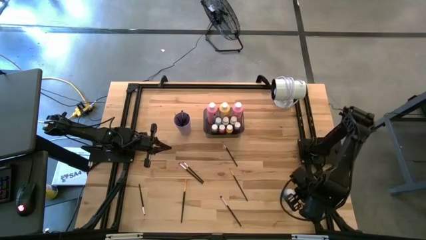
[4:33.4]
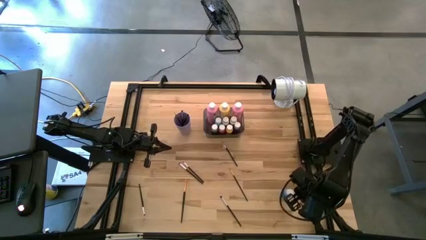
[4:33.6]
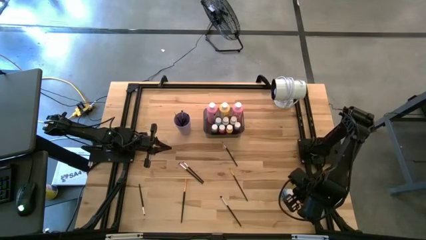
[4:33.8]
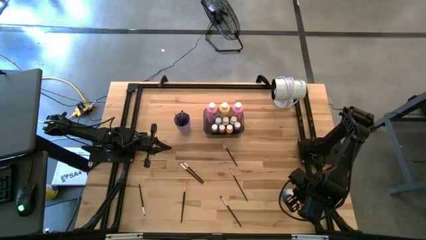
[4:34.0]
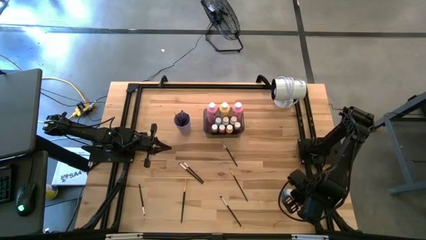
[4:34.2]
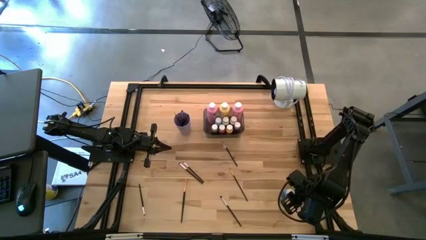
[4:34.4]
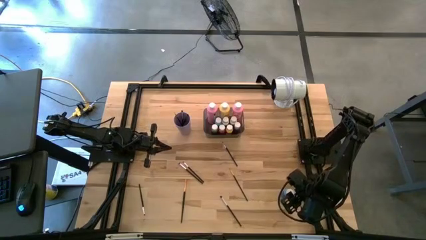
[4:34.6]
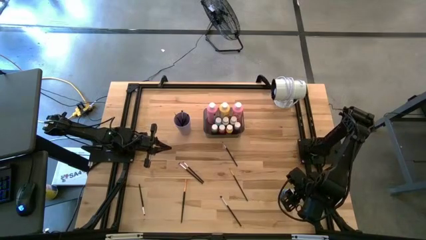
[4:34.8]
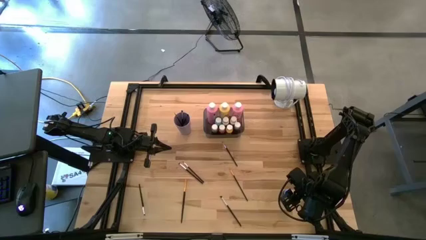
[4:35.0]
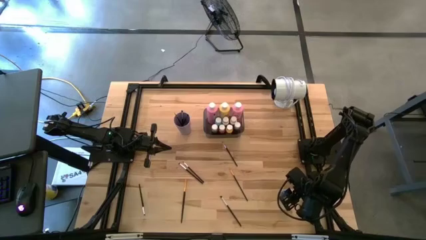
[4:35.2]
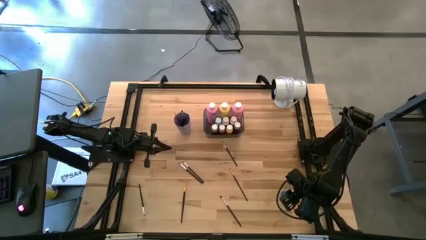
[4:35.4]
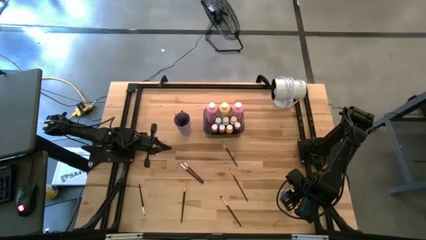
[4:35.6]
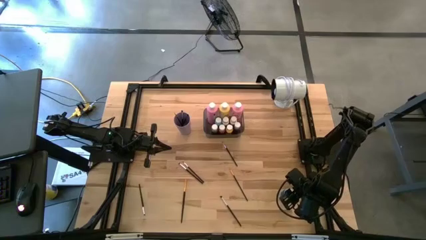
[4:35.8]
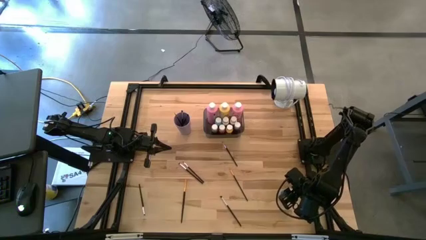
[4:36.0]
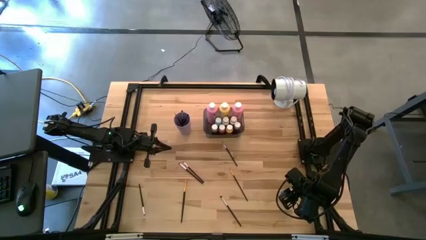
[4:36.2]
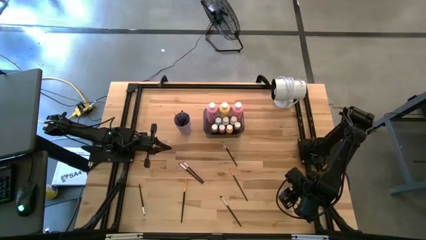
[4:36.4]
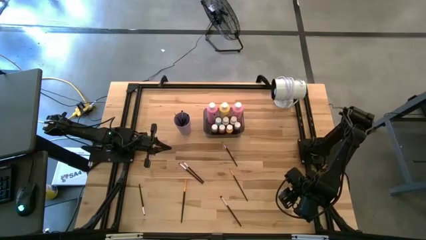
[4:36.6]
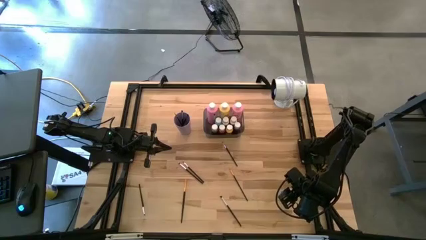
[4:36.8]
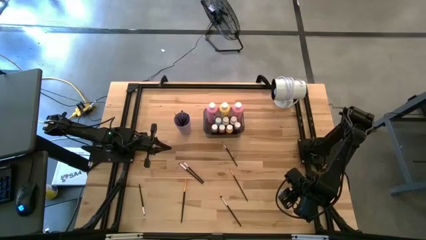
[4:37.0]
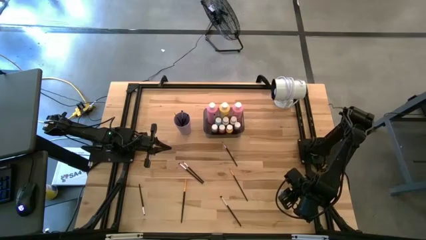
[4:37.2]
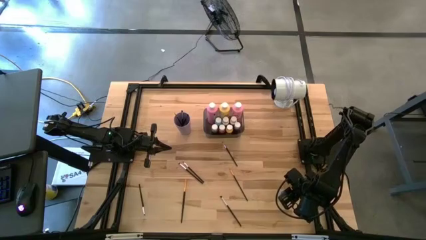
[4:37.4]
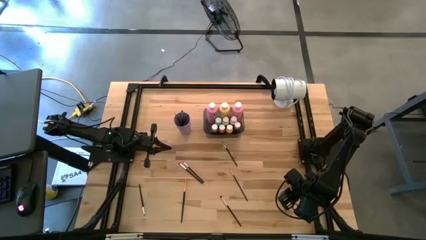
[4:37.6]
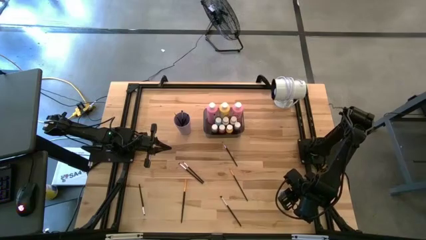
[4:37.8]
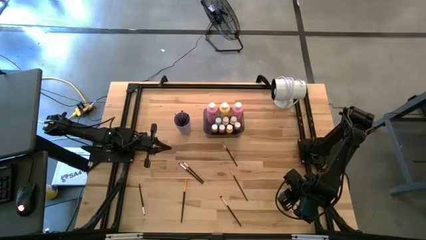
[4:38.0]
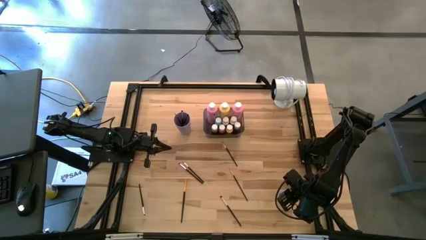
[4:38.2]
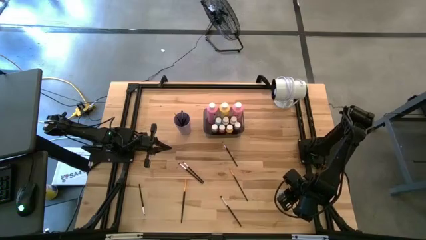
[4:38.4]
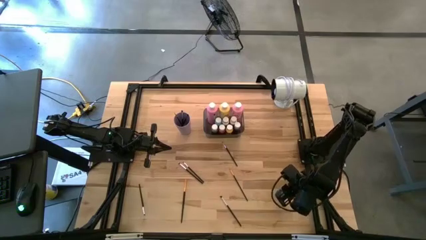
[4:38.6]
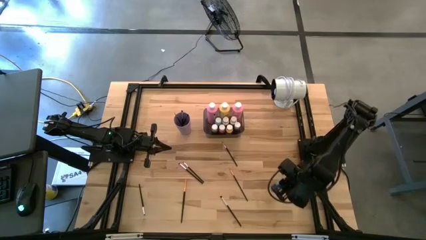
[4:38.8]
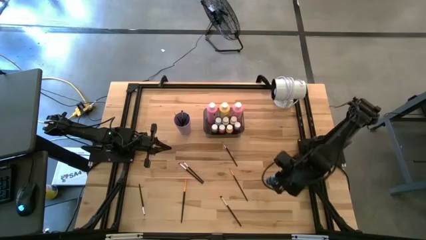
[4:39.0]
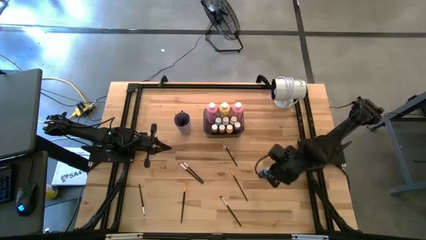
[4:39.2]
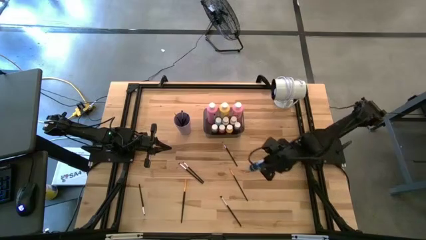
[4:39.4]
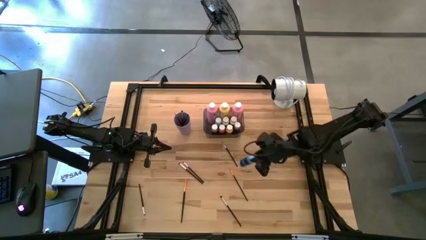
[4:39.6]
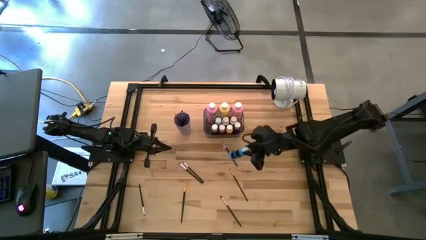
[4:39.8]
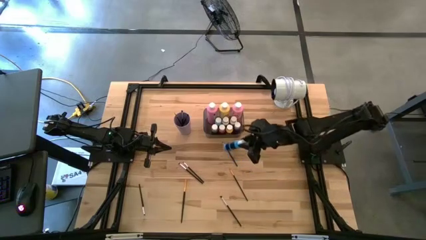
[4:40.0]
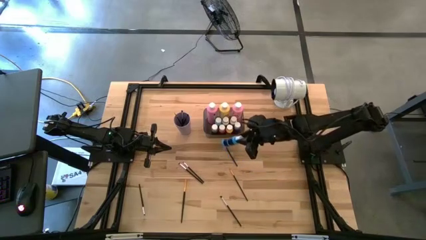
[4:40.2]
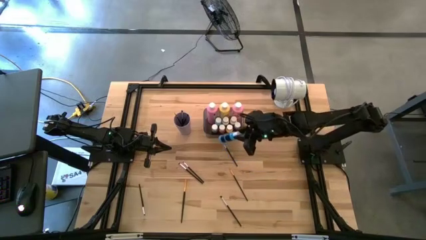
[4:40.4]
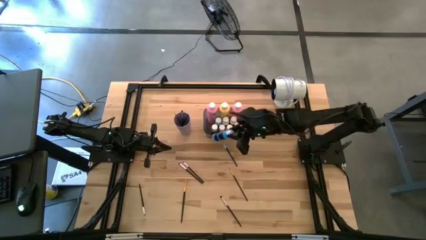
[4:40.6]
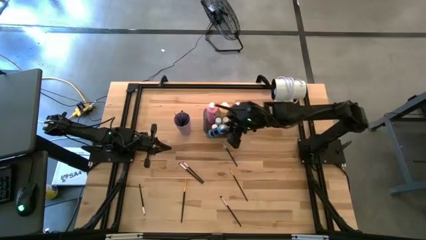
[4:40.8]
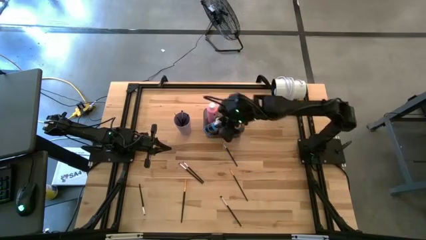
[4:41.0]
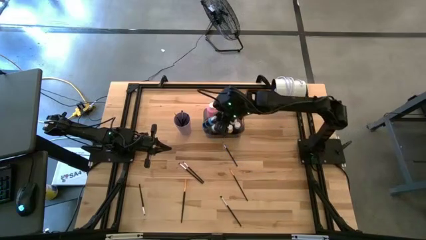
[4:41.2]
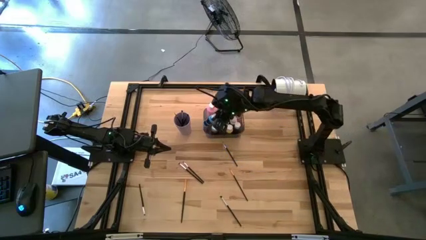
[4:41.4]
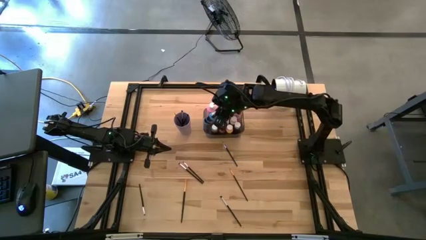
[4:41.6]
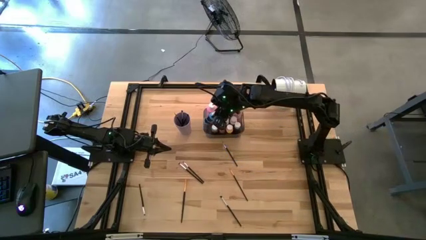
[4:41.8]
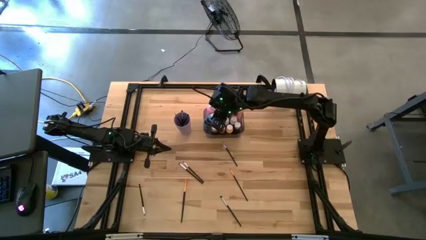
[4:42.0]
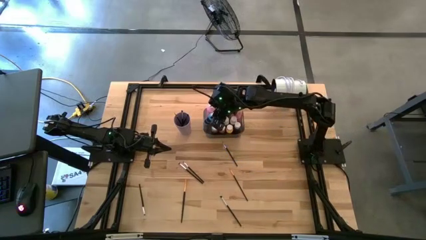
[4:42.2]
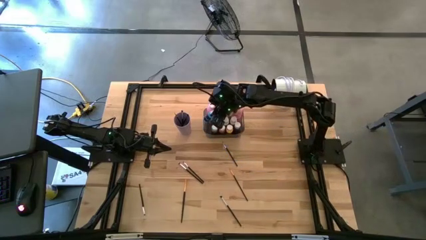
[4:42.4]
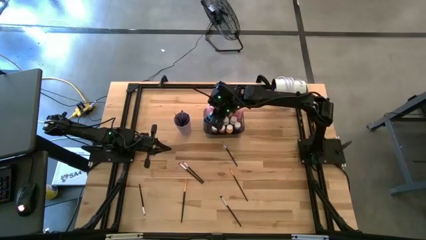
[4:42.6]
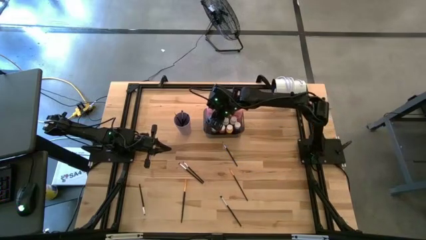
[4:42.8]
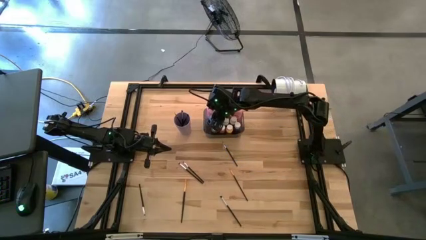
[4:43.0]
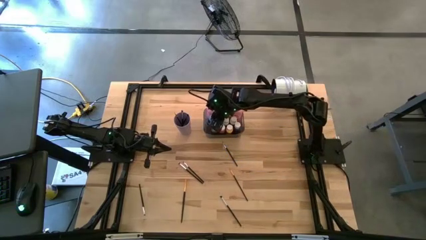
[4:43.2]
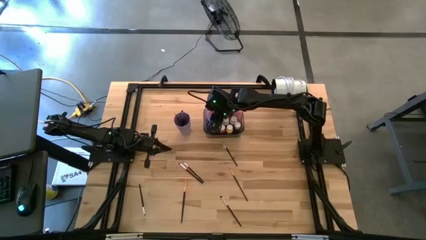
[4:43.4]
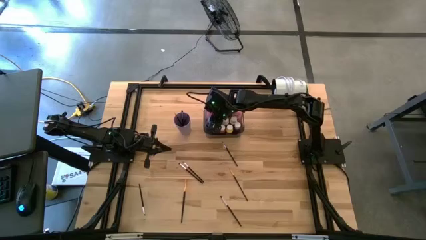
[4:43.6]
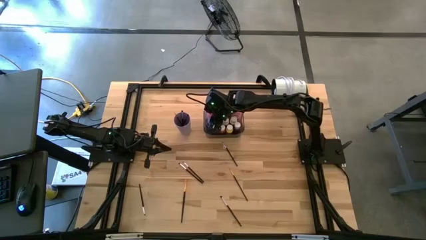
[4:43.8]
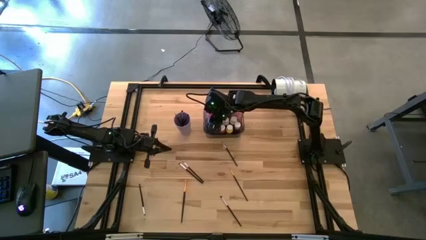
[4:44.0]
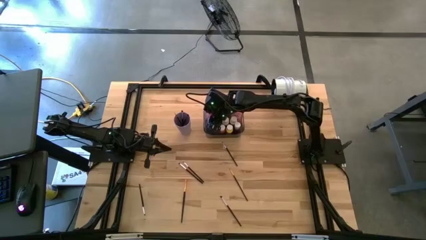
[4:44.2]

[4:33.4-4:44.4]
Task: Pick & Place Paint Supplies
Put the small blue paint bottle into the gray bin

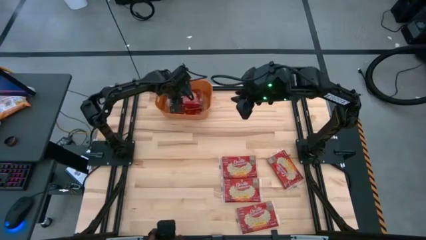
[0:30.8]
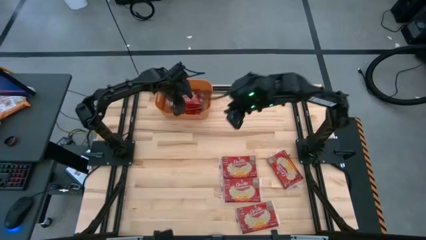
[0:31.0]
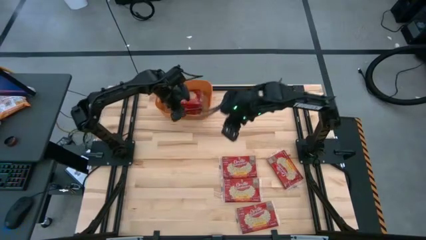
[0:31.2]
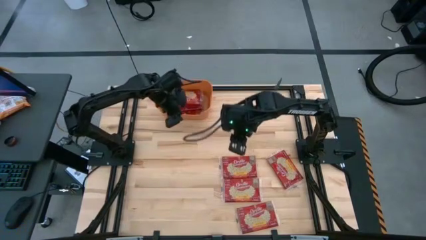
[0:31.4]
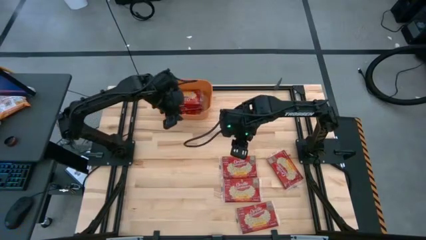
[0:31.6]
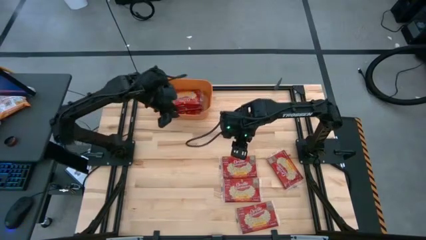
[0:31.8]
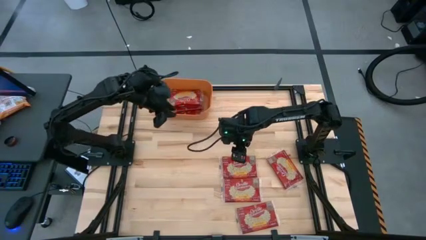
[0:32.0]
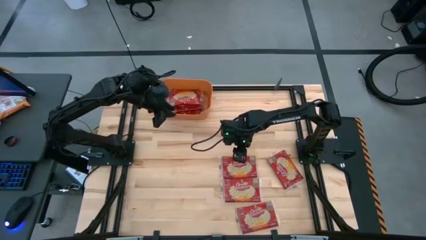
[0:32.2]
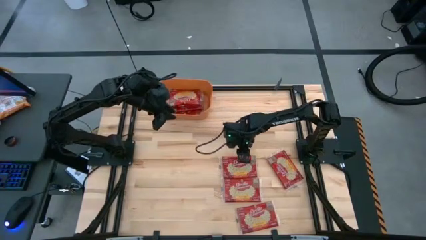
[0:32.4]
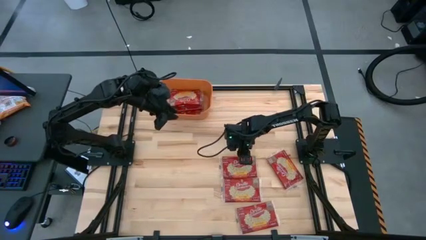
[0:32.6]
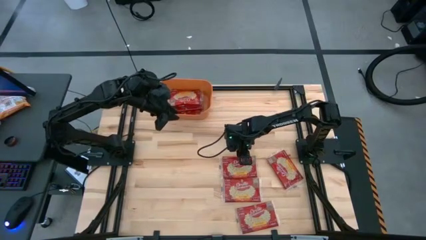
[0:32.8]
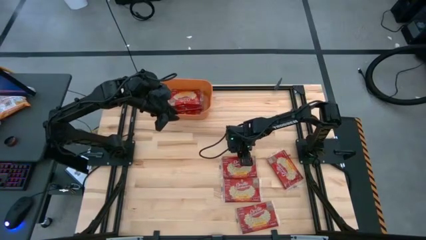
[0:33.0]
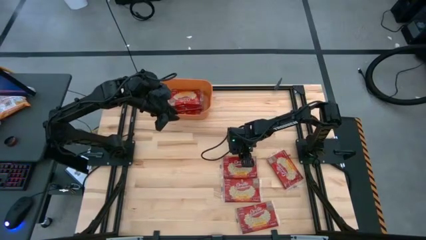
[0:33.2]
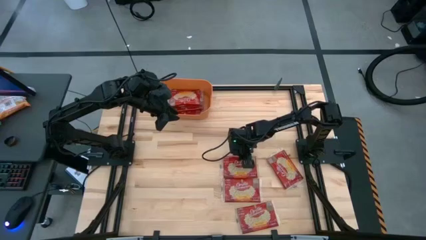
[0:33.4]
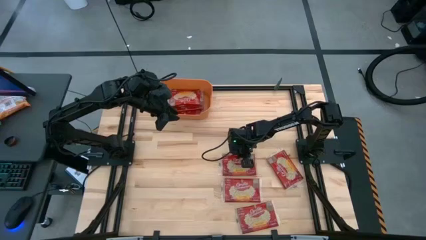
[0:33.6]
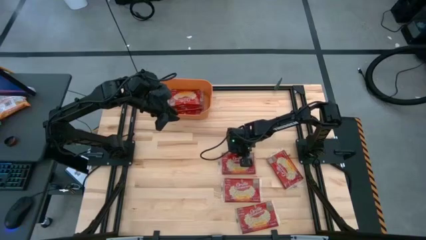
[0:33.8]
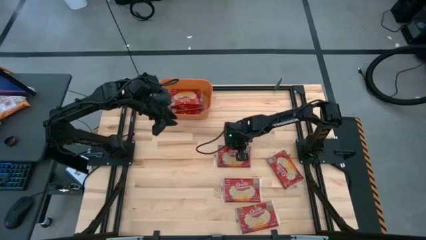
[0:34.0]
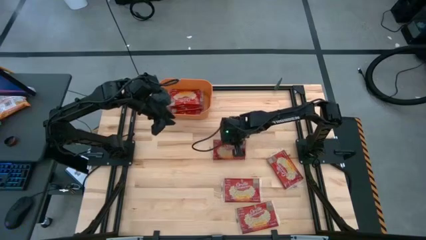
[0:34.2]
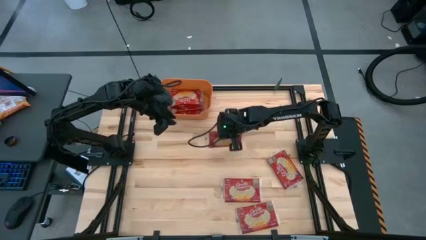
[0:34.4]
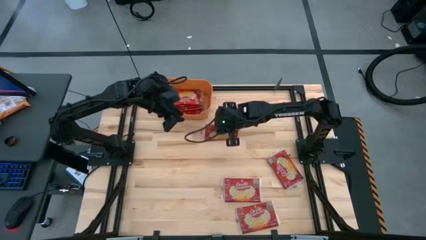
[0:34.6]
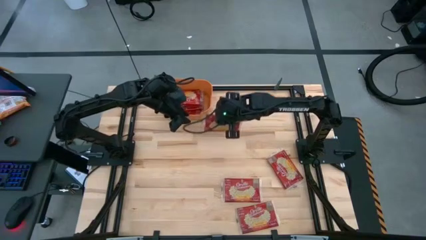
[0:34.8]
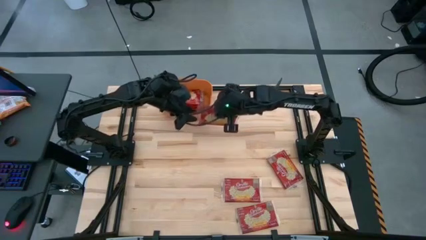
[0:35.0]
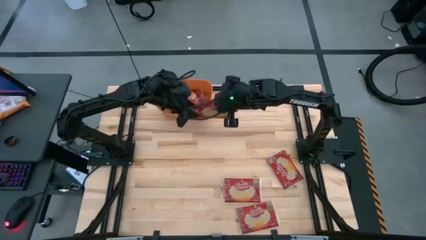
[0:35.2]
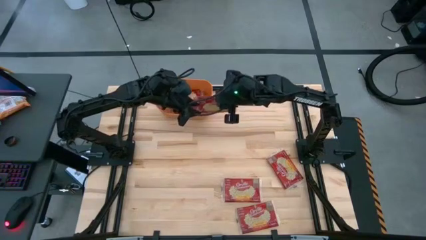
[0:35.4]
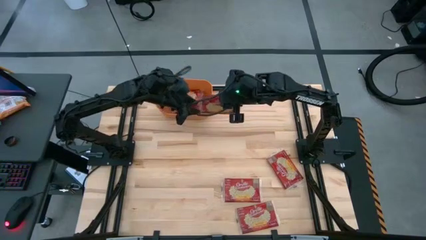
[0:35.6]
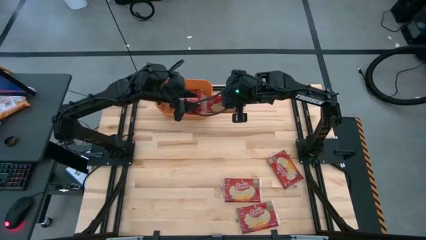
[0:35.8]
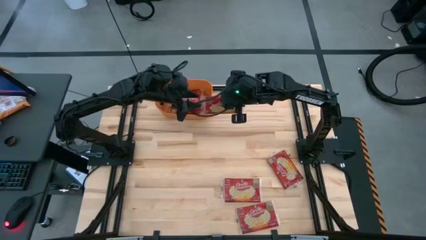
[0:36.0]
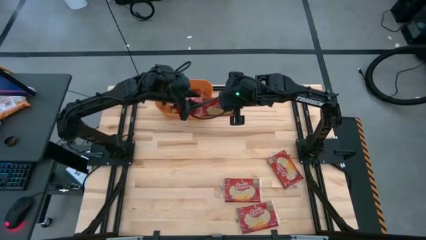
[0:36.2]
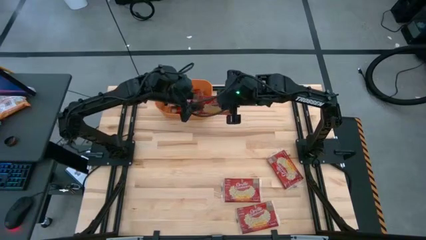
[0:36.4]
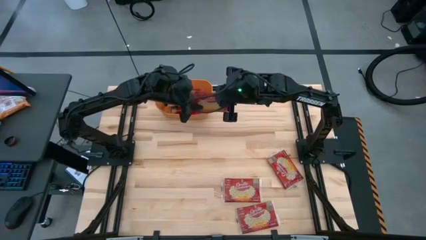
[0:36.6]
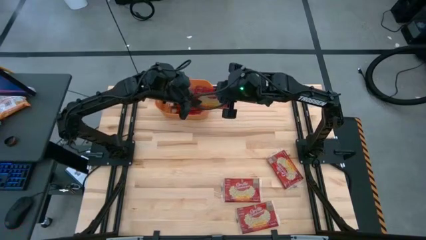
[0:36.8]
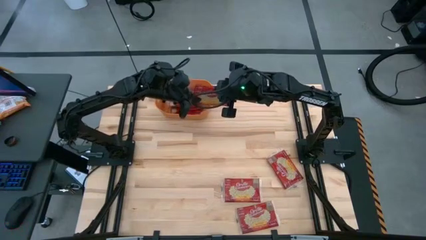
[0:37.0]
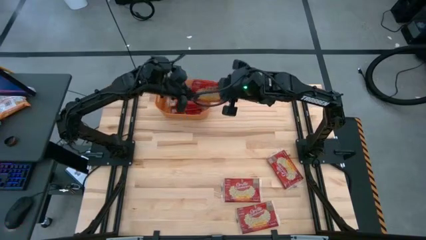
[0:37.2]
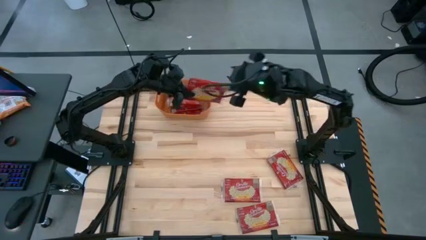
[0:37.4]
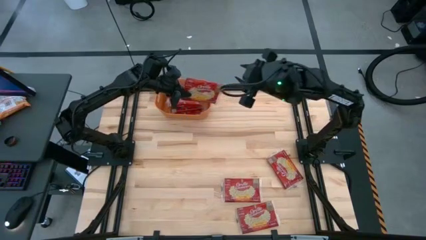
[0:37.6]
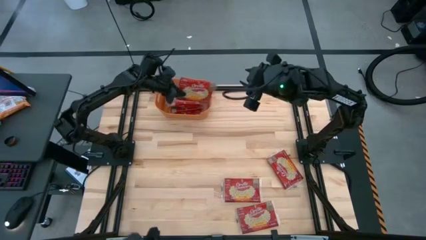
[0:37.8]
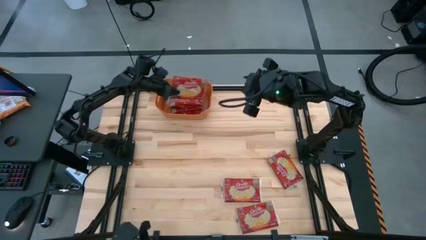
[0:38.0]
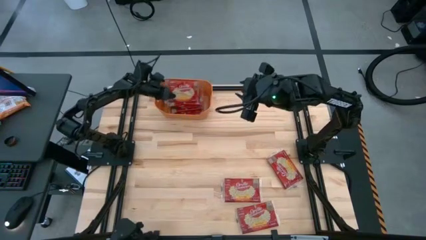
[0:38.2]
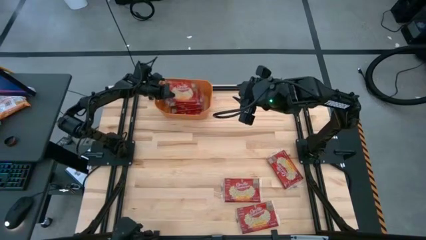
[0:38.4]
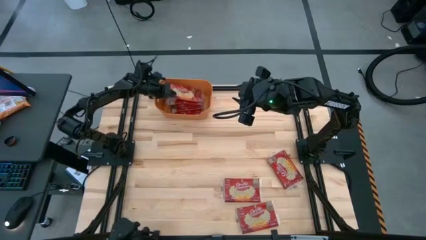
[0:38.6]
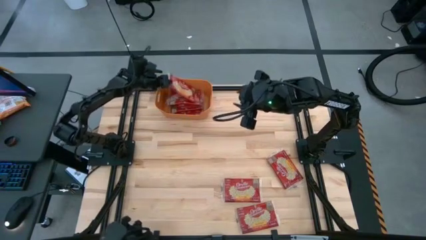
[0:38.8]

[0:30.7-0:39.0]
Task: Sort popcorn bags into baskets
Put the red popcorn bag into the orange bin
